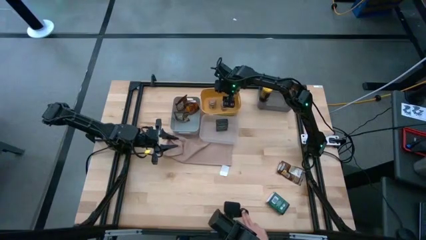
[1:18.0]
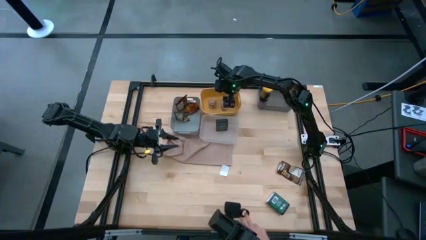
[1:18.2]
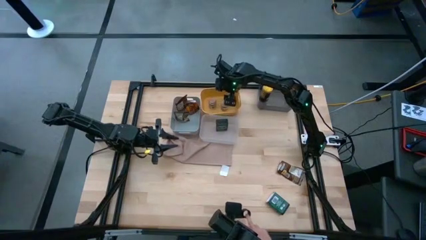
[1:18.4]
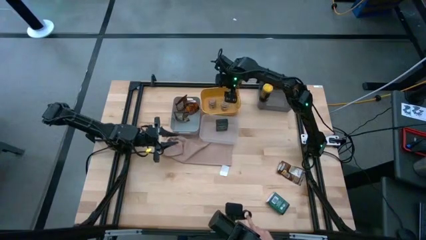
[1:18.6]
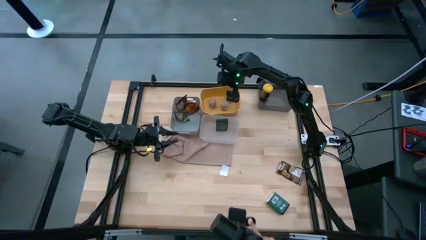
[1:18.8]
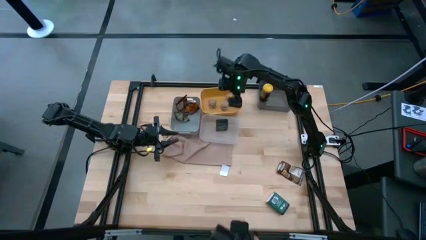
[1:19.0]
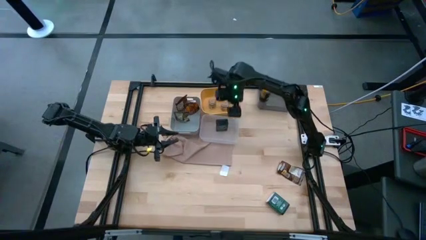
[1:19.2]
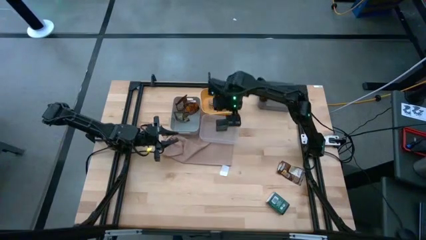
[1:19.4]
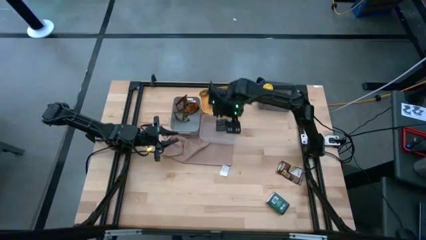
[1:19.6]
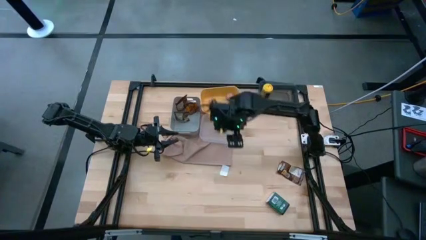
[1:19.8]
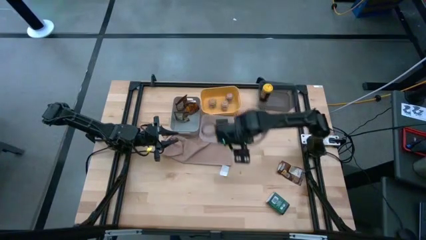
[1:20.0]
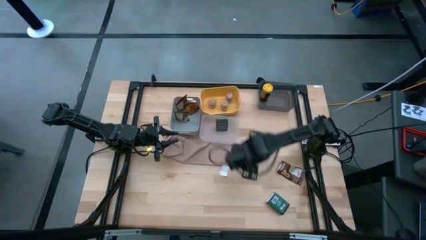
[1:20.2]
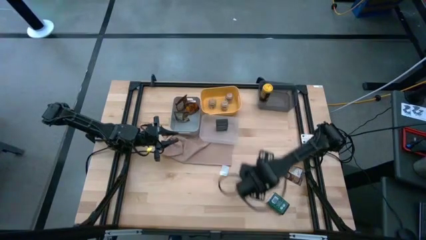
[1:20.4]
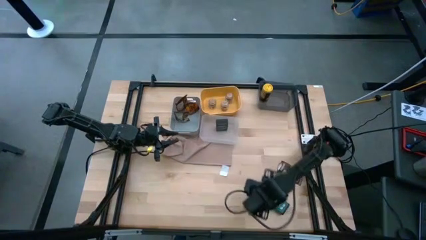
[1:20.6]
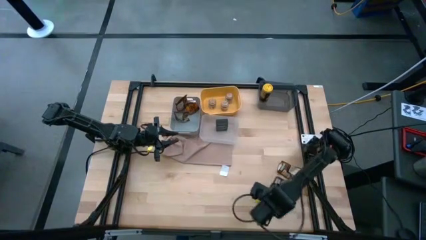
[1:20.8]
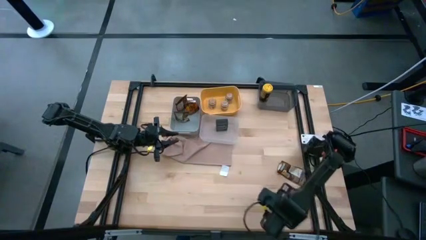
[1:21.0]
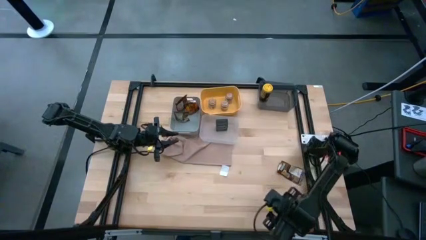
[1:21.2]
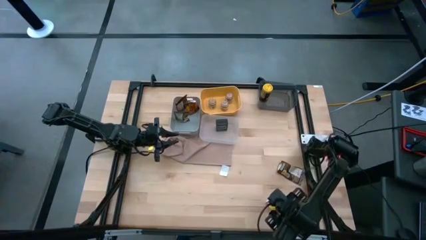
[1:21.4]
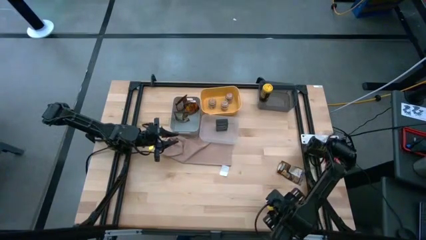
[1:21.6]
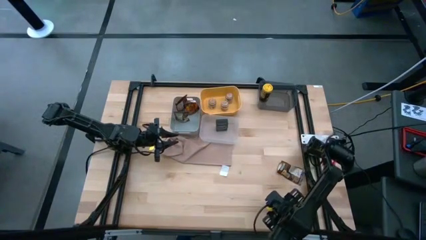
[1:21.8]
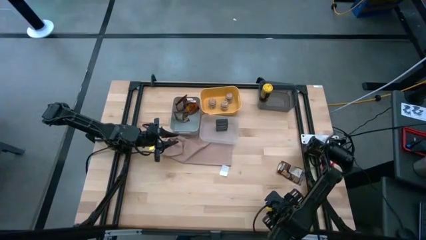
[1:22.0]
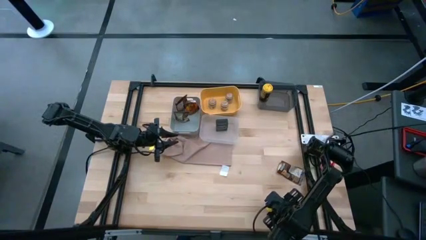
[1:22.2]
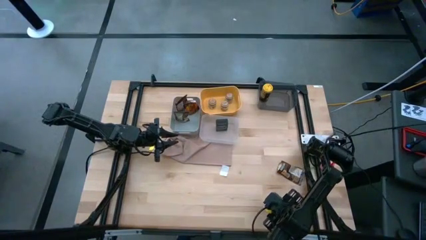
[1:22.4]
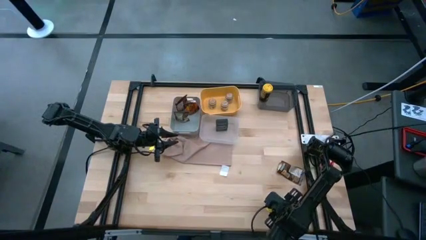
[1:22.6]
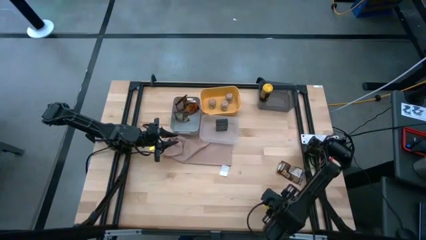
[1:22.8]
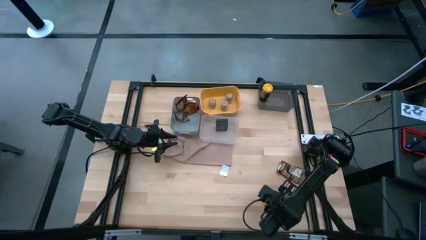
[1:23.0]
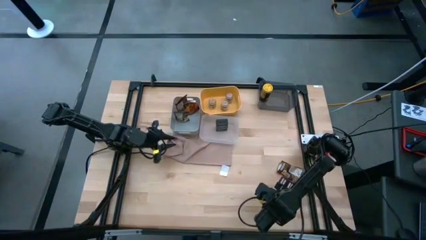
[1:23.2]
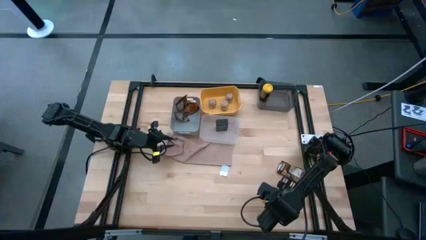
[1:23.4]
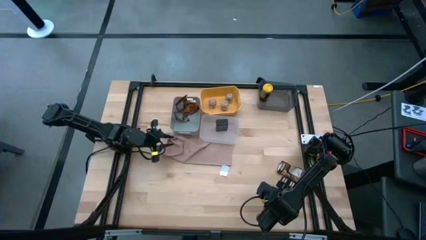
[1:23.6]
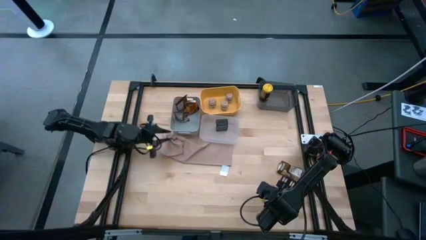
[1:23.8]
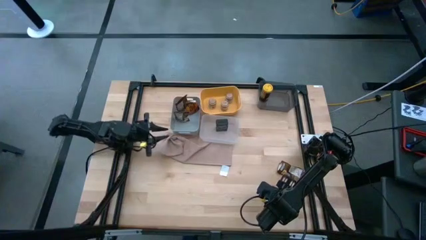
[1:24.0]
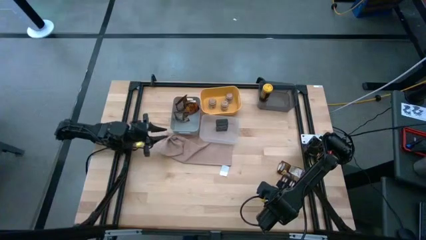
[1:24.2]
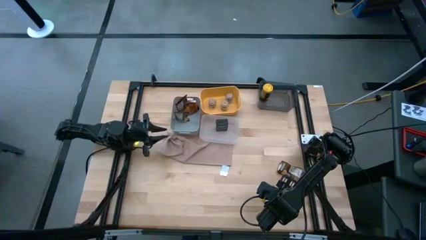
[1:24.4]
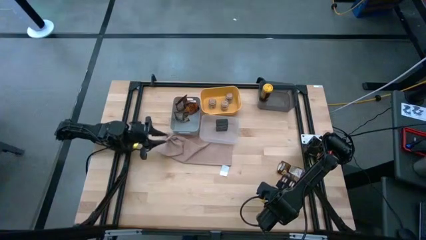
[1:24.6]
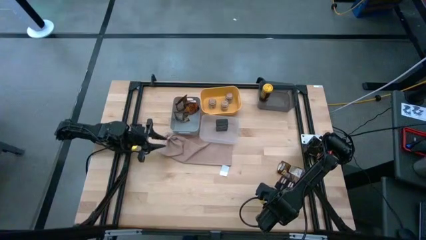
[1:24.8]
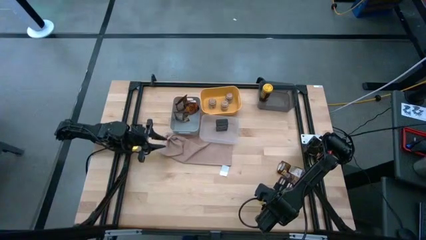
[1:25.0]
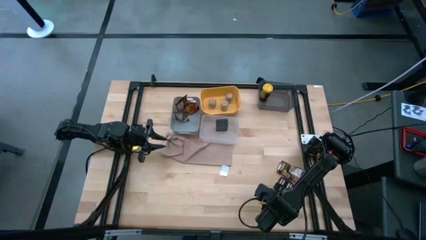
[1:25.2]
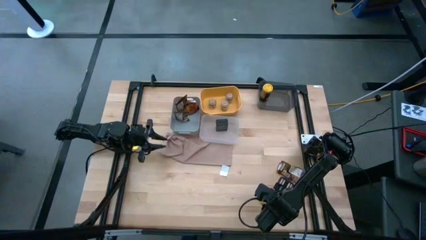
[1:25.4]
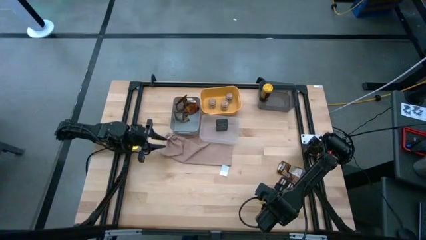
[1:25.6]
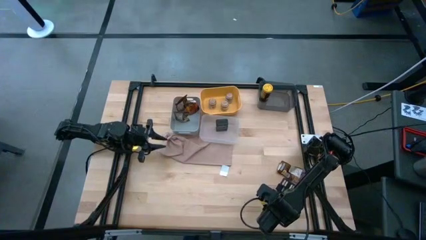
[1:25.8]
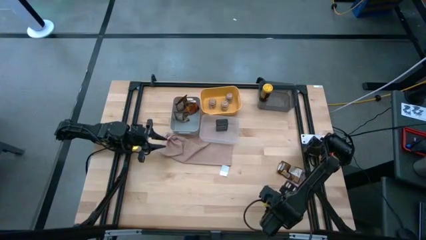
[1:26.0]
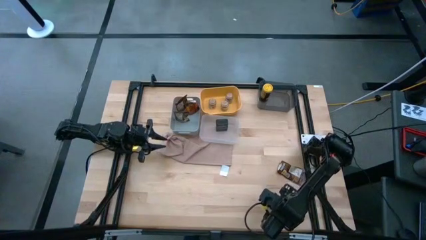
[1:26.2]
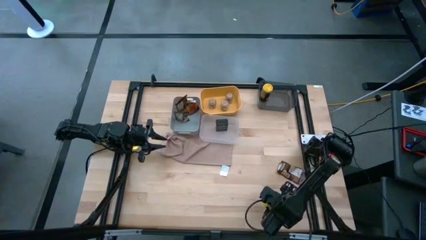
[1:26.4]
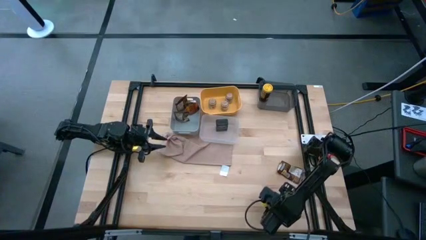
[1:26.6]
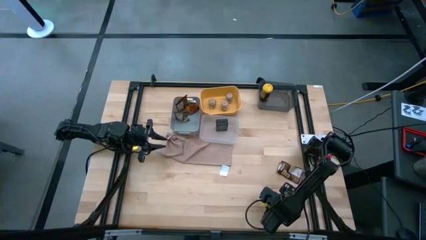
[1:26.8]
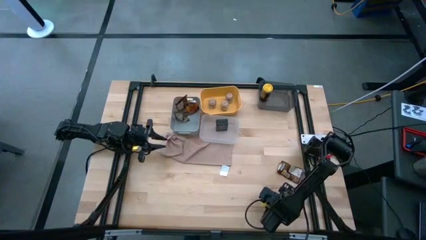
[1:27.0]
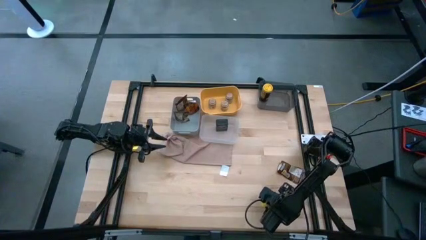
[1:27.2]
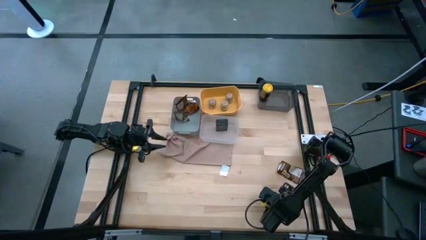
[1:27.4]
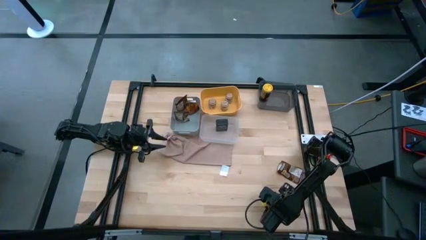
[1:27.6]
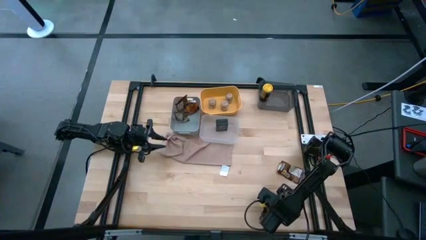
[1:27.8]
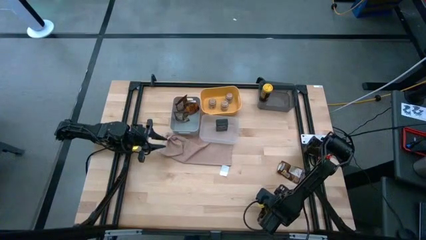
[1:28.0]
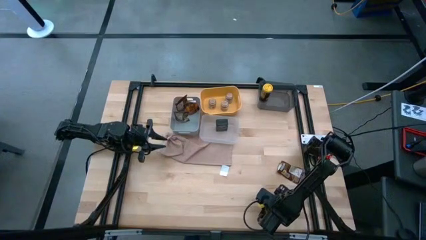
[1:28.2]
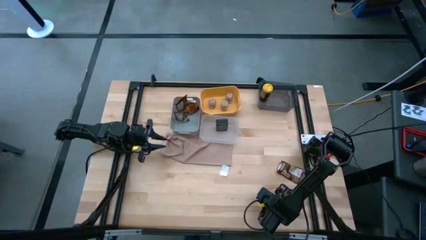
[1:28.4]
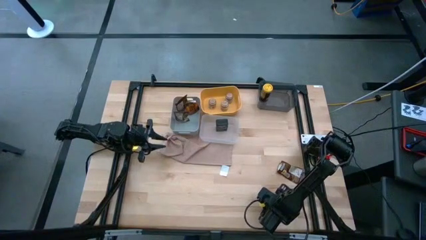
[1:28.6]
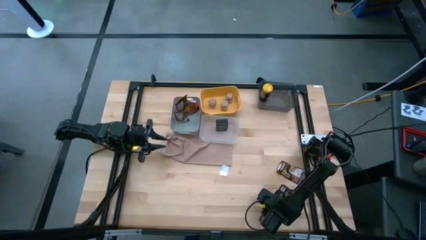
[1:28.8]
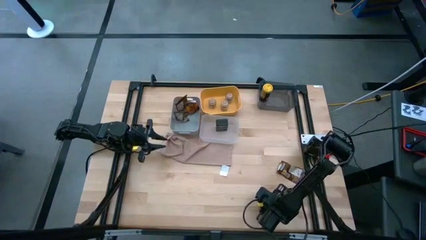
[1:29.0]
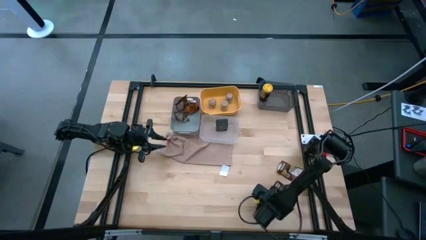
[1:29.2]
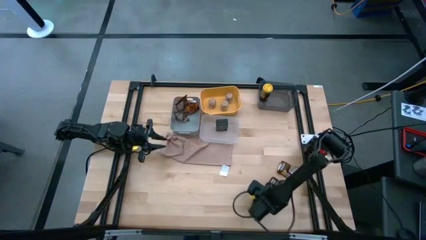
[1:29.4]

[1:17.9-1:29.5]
Task: Sort spices by type
Put the black seasoning can into the white bin

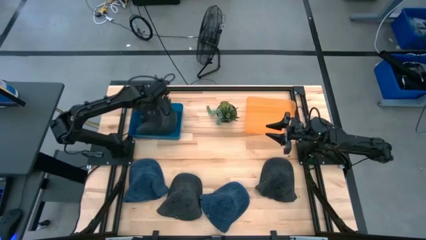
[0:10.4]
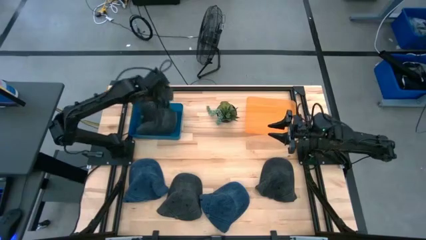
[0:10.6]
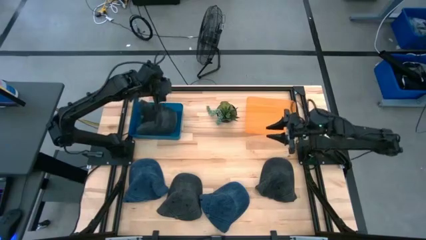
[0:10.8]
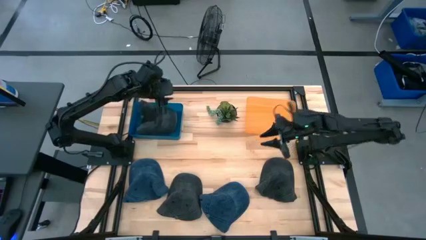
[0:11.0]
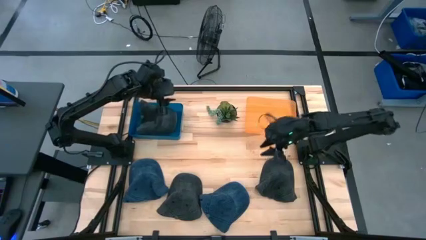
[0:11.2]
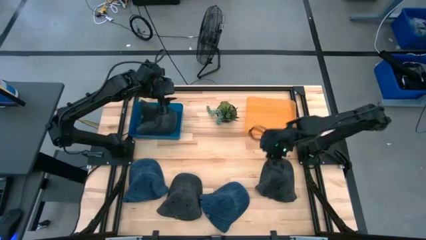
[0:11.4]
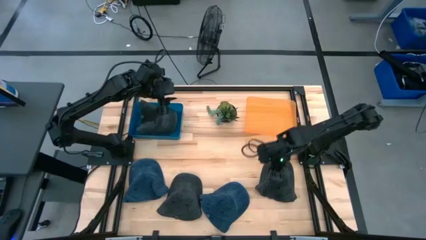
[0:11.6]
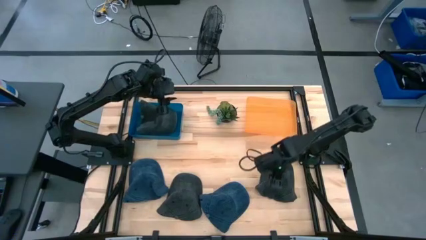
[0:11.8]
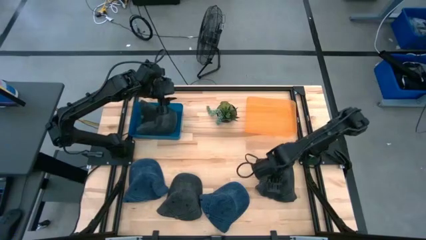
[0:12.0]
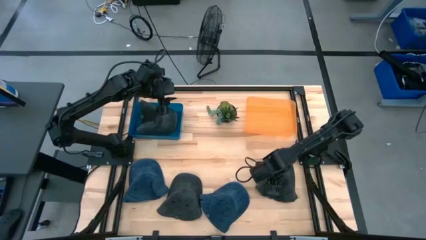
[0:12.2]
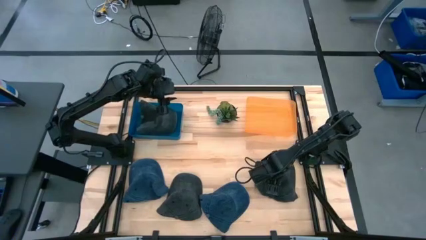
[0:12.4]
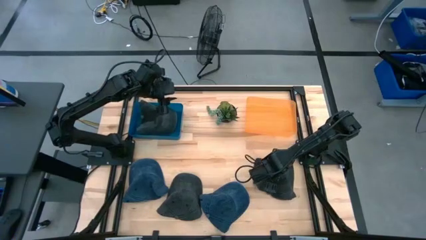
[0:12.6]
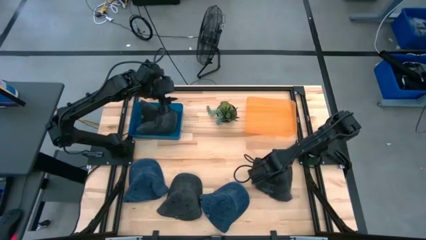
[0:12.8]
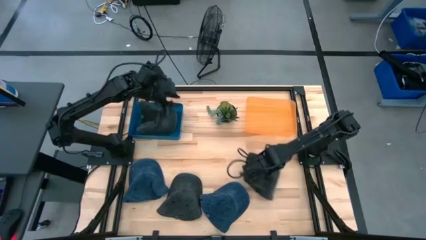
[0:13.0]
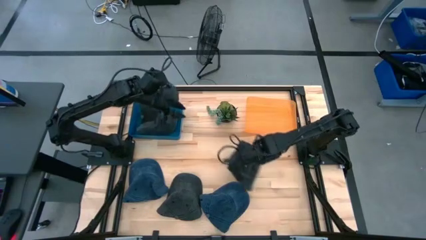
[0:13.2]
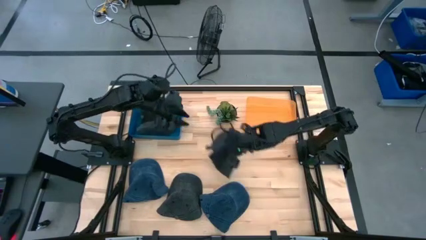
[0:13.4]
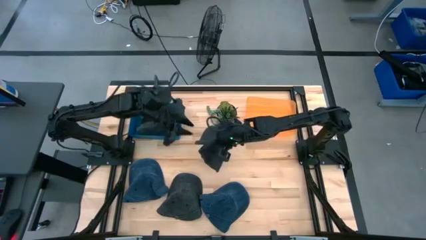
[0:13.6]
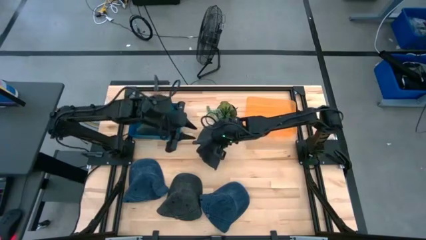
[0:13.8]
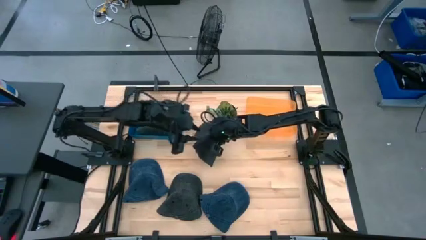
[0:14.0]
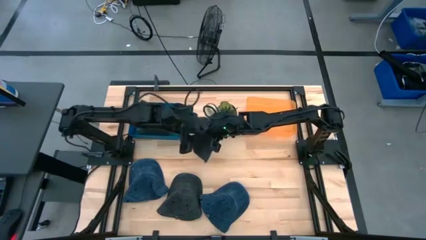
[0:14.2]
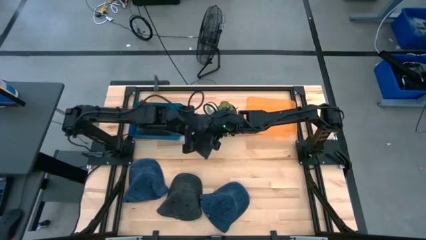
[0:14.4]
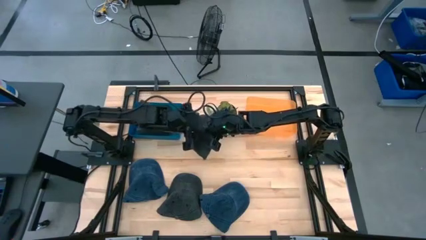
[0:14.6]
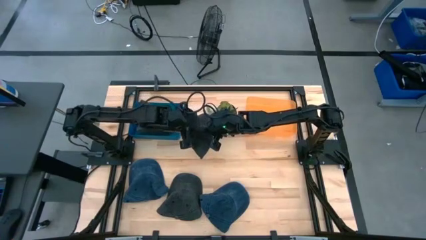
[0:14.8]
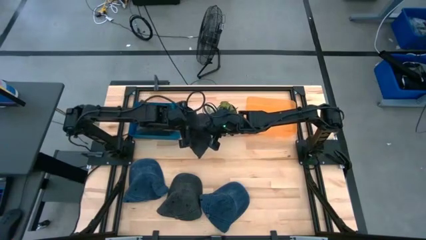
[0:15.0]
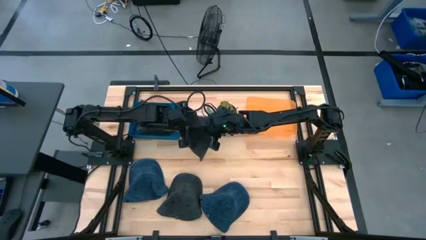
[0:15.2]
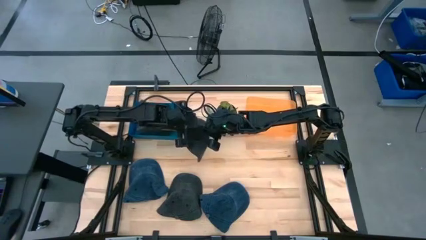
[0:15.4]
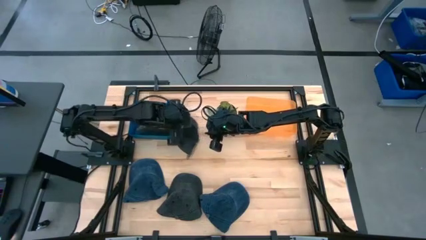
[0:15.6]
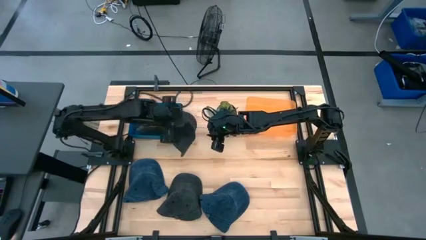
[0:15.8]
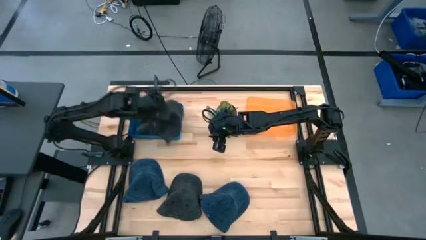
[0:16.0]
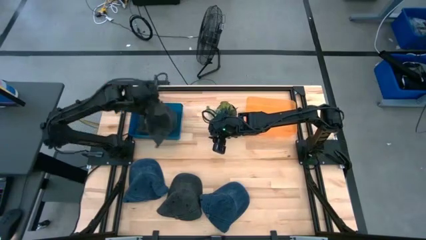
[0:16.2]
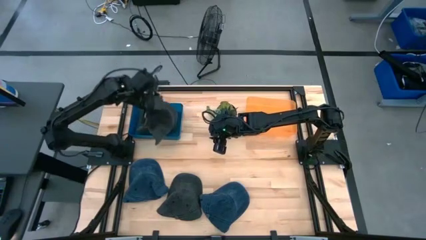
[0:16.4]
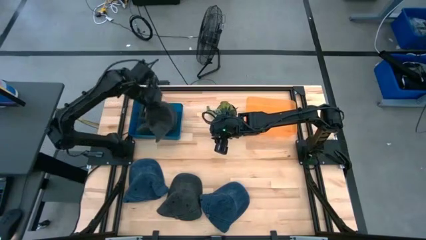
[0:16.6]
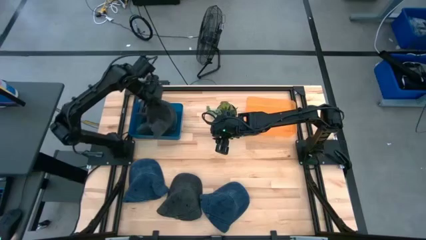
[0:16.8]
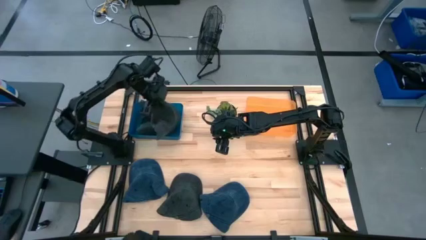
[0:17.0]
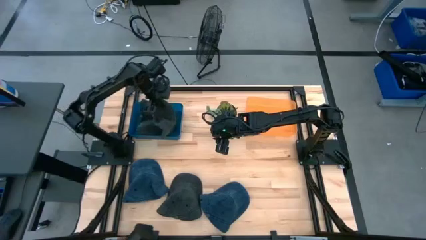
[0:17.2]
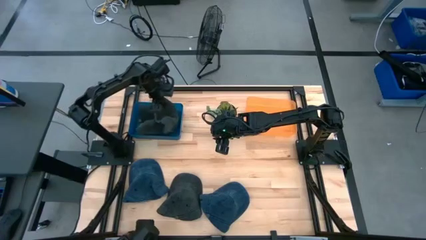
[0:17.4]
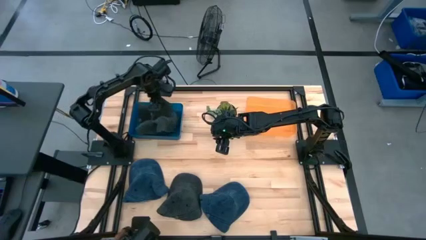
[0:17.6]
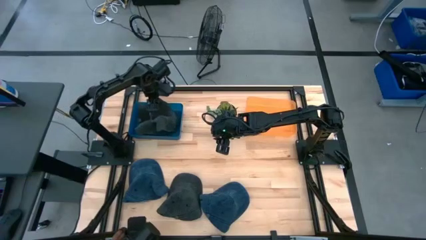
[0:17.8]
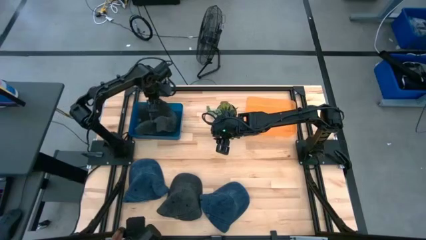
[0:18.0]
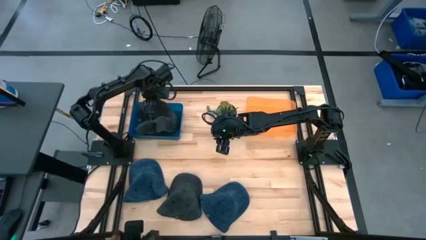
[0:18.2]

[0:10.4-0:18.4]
Task: Pick & Place hat
Put the right black cap into the blue bin
